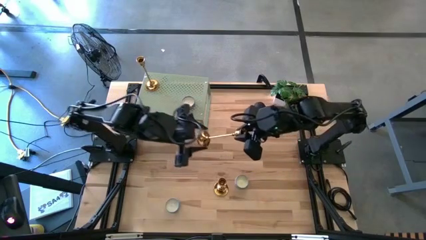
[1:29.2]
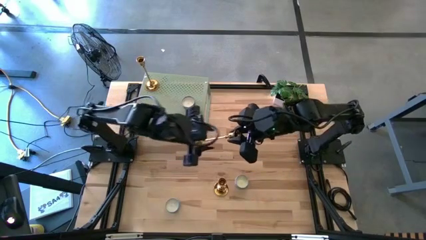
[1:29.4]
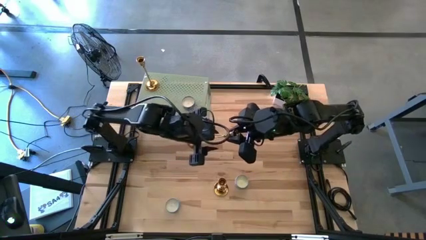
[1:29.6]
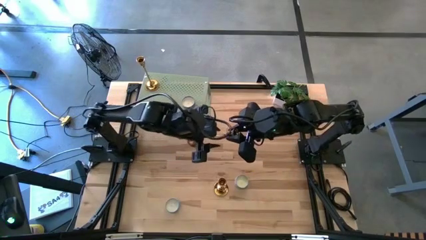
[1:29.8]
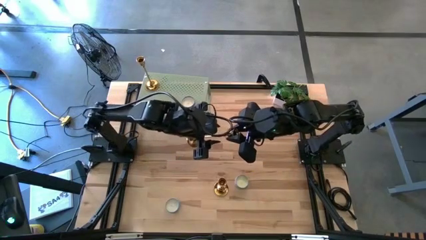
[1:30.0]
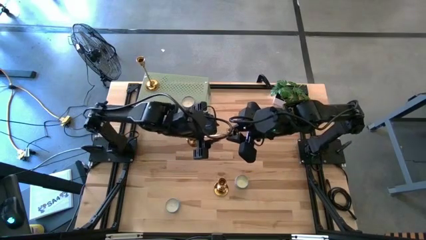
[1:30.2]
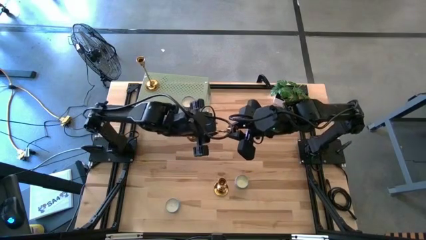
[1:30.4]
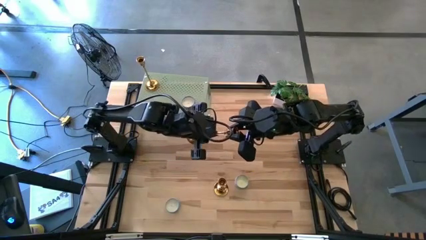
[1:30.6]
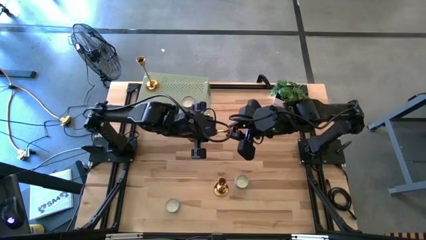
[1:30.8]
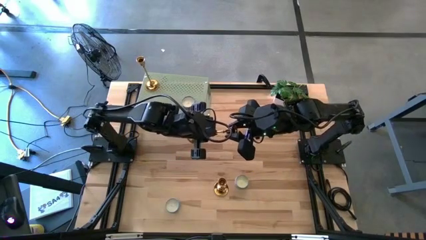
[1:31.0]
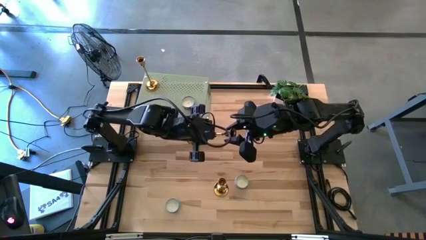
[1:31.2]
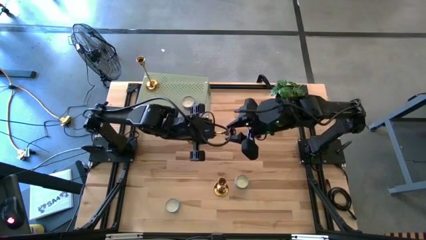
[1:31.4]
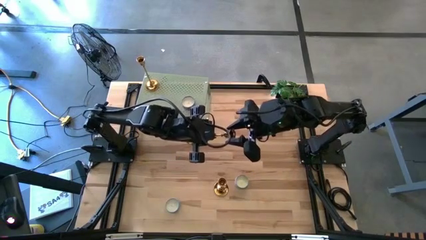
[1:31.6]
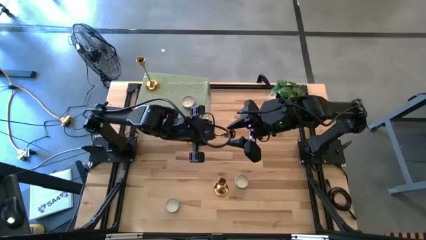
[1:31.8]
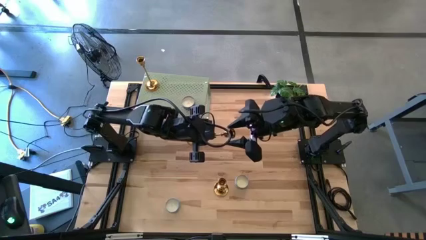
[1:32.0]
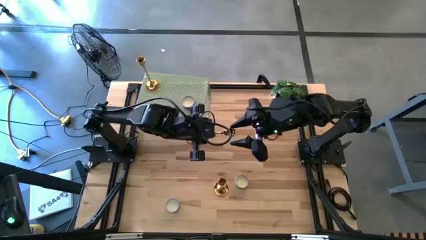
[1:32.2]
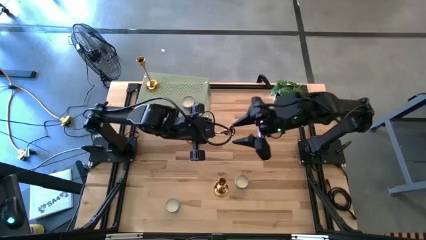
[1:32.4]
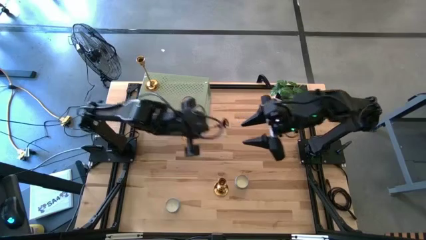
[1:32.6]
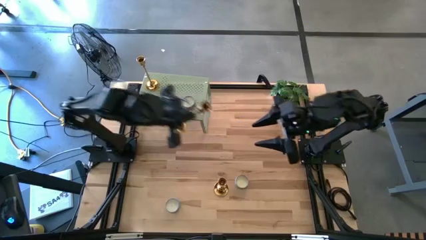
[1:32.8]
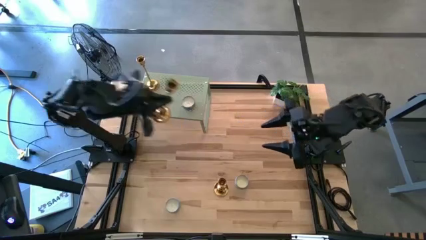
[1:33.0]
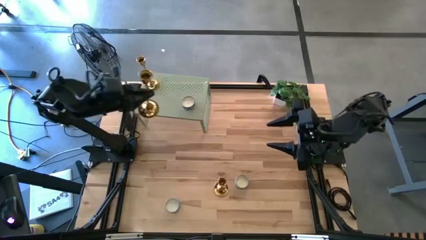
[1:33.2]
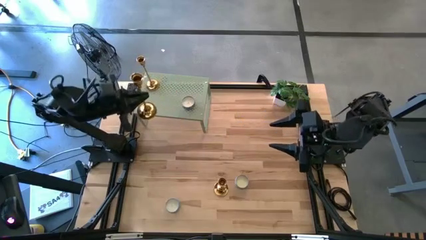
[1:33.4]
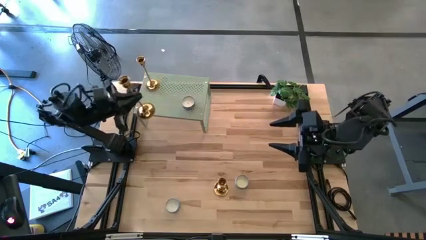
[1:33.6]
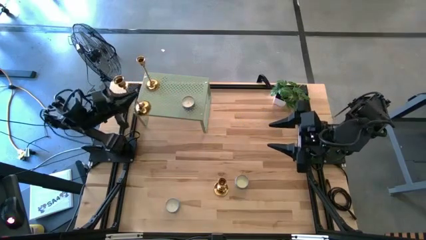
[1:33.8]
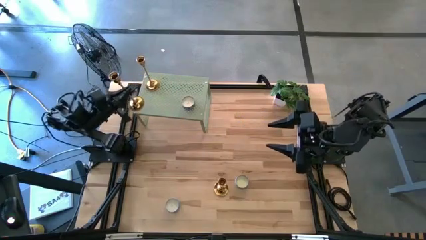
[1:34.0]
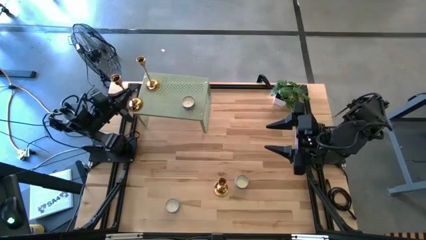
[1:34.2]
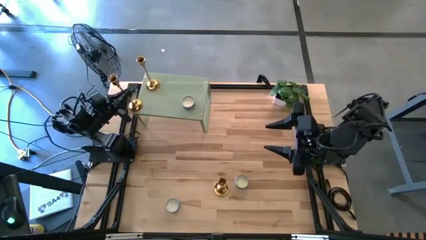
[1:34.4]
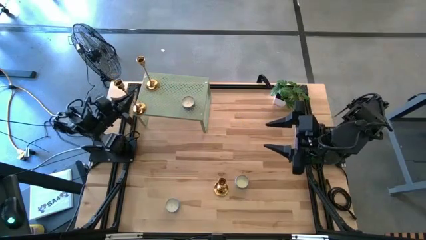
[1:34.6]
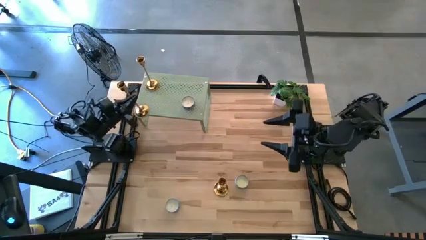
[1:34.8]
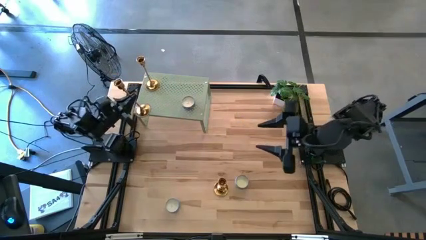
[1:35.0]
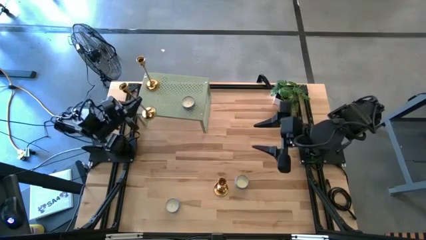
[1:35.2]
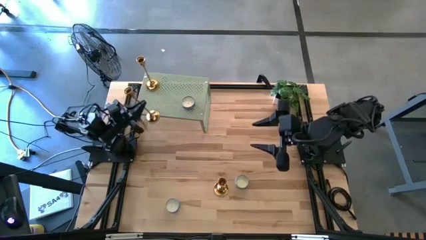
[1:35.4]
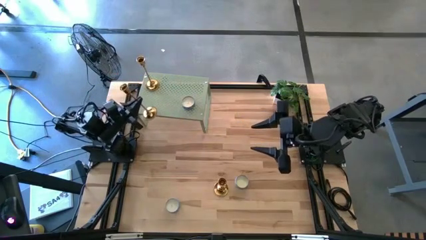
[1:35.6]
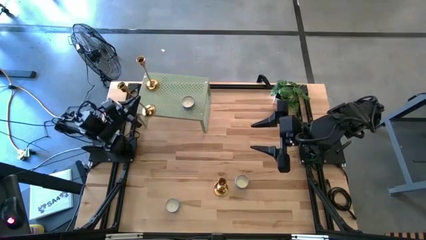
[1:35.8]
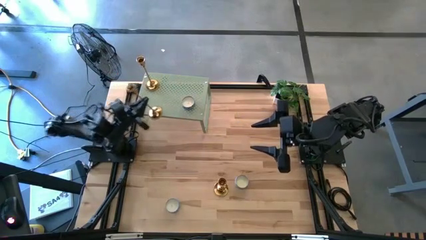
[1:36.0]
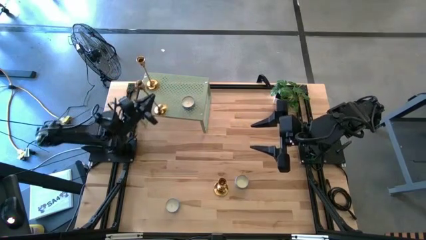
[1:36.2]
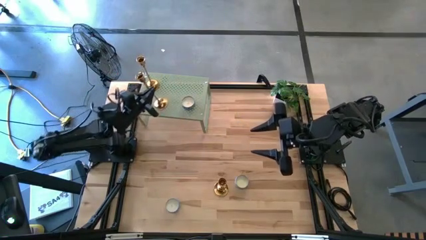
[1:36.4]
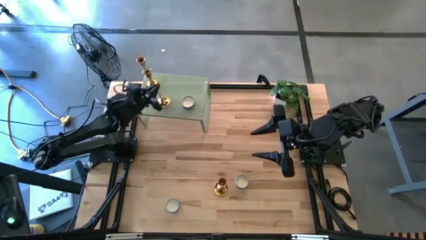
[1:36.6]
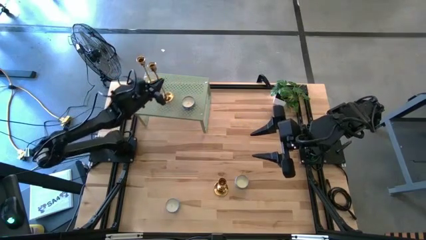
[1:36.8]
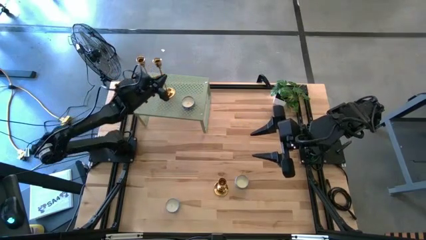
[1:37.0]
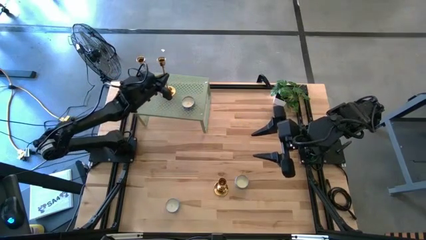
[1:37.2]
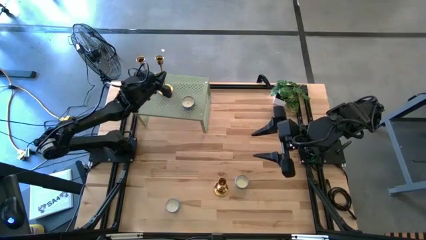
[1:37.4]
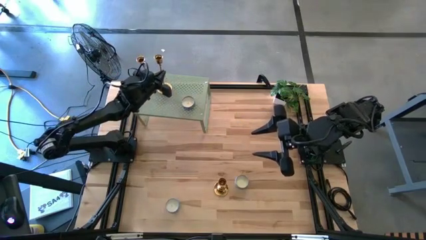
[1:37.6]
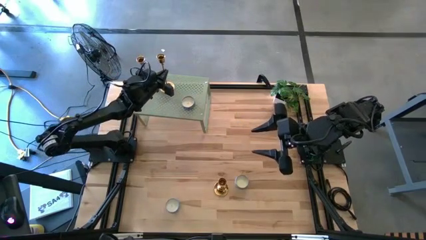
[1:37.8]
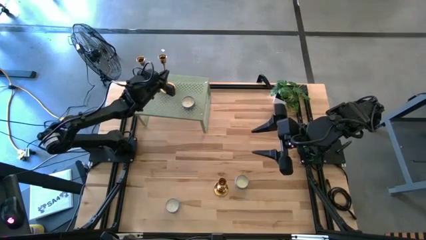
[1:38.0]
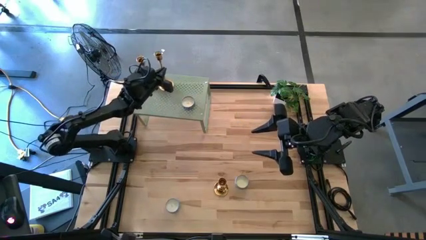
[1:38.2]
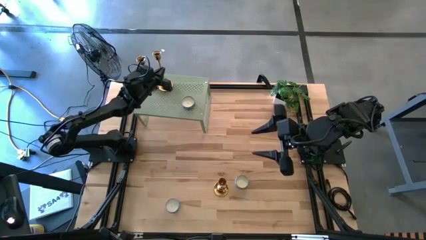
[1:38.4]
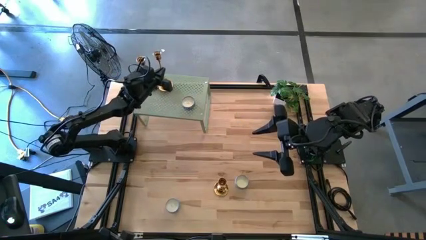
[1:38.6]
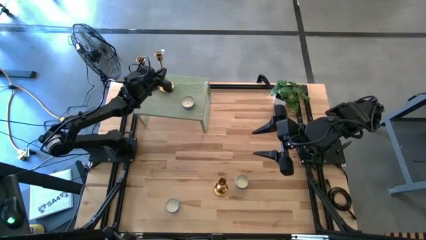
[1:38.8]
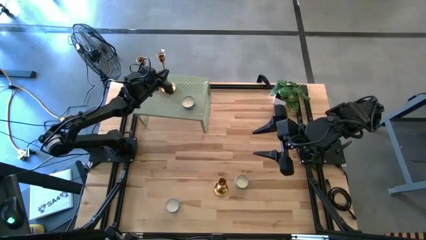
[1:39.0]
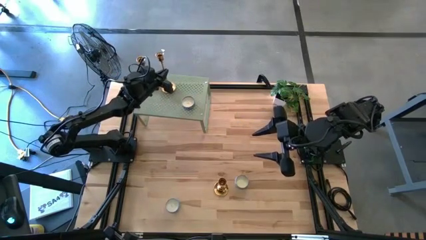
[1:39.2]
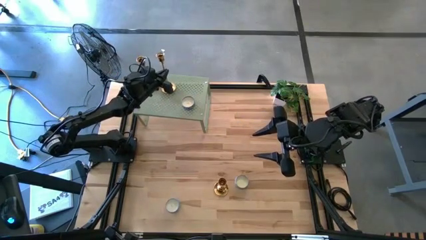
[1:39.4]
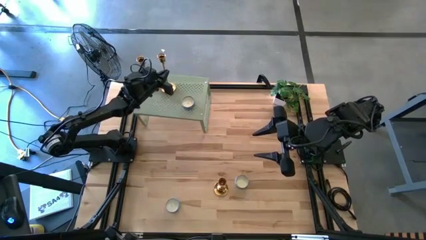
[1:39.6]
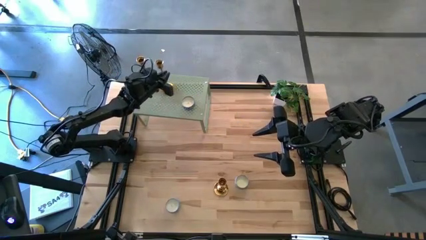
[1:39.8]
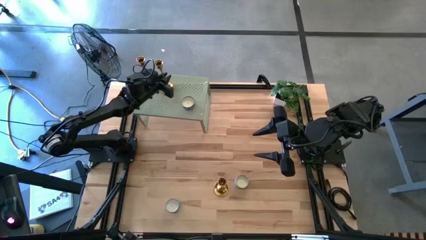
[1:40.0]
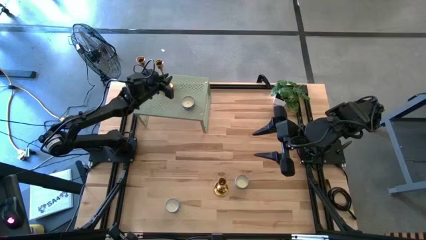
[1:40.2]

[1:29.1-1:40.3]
Task: Pick & Place candle stick holders
Put the right gold candle holder on the shelf

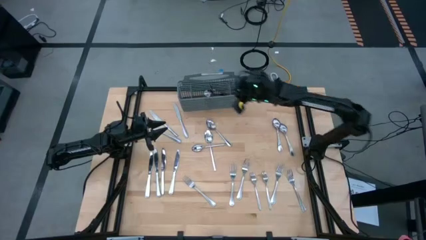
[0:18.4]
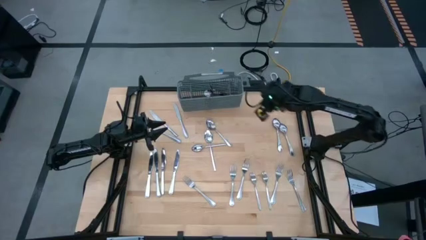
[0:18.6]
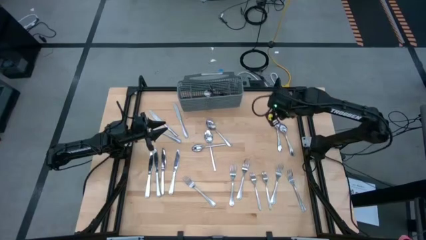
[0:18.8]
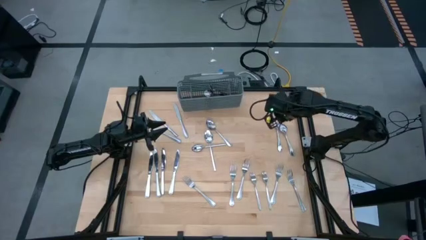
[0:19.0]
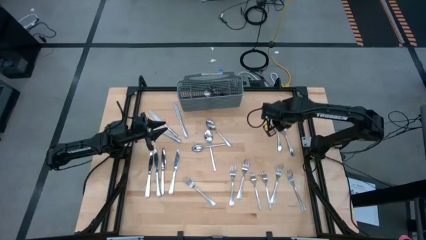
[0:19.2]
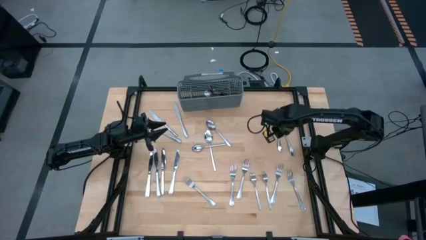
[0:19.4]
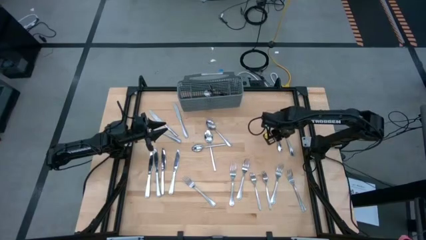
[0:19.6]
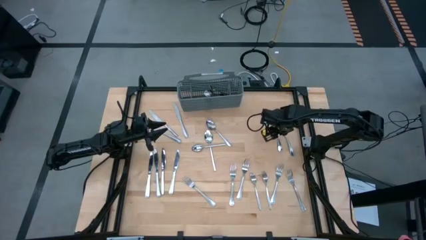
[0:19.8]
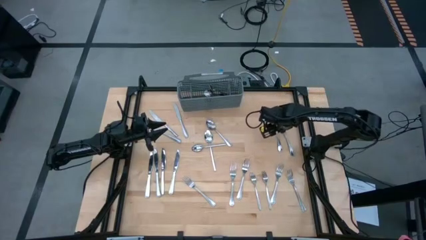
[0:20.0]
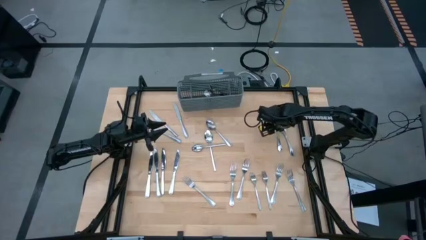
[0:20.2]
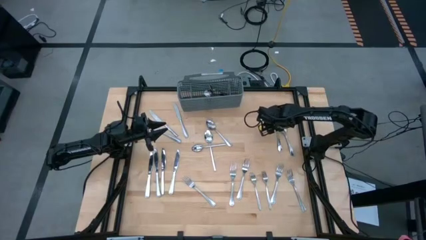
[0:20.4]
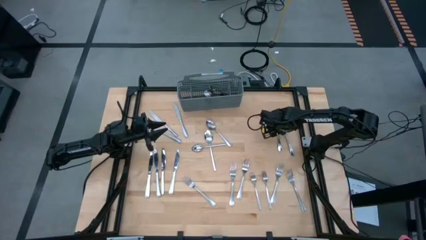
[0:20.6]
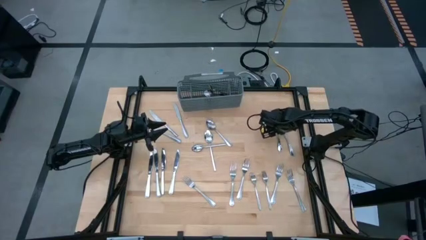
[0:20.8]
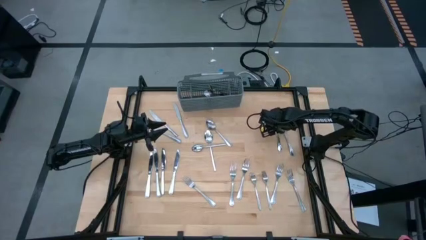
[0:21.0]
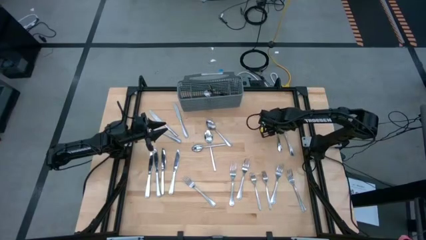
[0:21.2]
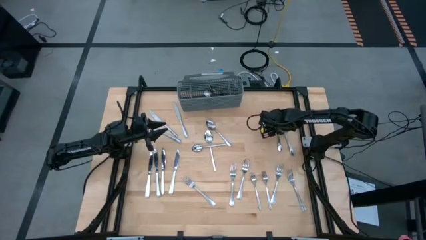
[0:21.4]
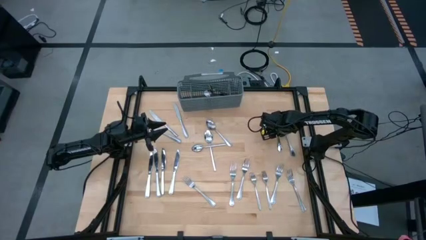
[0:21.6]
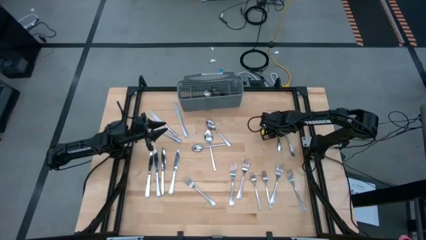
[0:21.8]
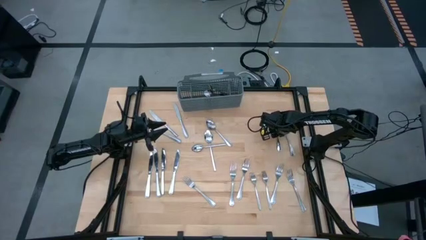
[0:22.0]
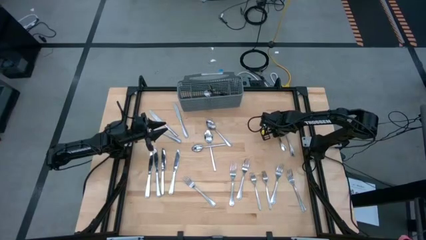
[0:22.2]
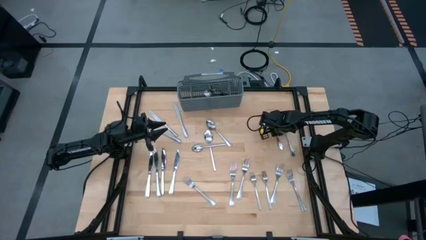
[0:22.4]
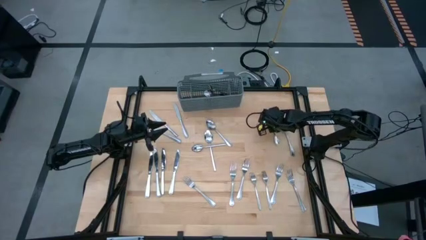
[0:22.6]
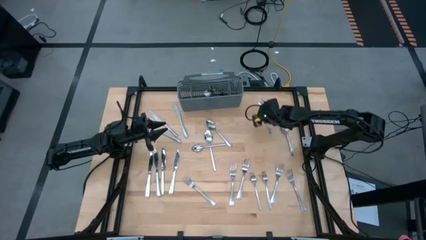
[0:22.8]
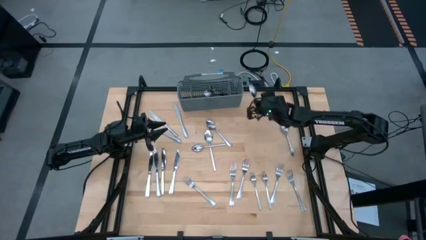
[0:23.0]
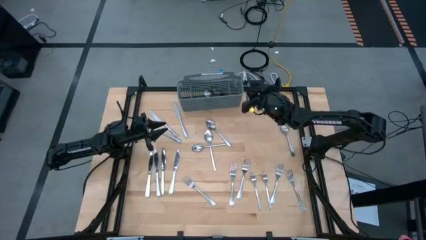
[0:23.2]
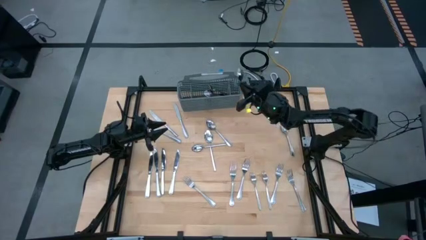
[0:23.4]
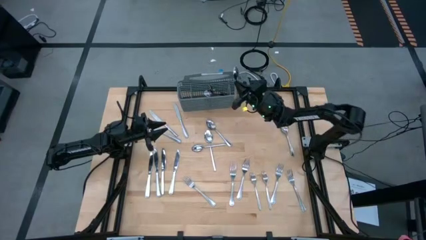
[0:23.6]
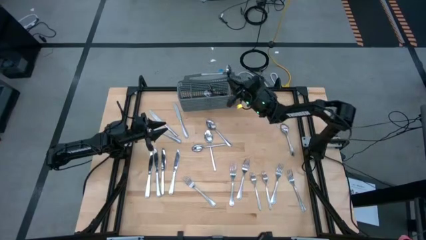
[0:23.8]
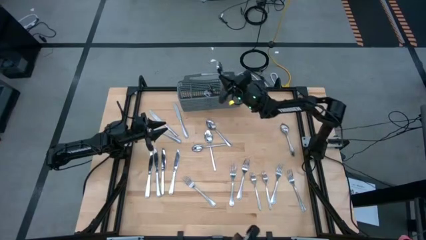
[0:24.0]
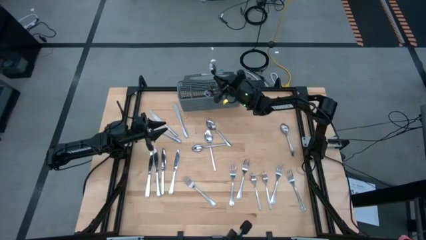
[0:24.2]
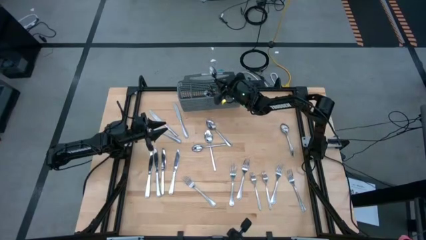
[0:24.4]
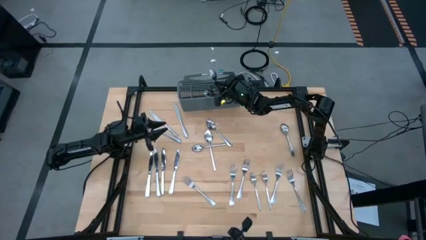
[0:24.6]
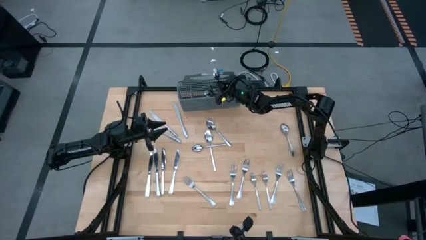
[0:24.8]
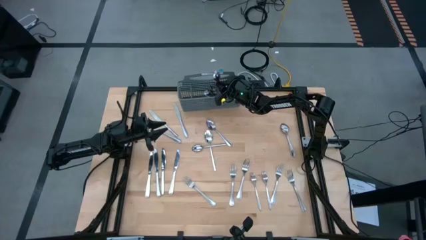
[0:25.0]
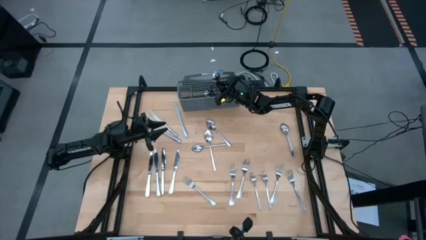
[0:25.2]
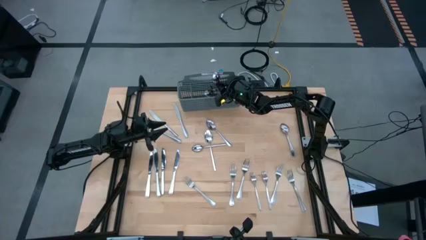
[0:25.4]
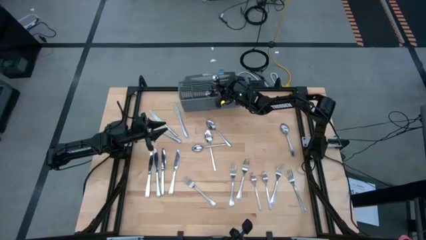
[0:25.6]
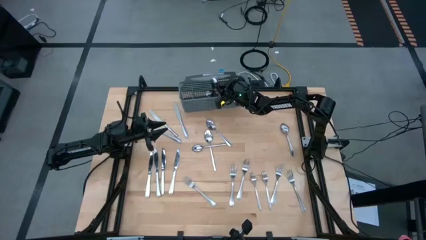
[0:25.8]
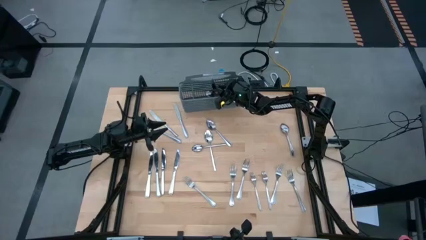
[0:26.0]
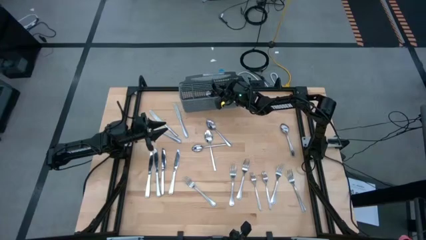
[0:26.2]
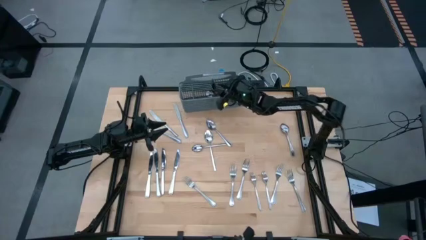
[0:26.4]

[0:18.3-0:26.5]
Task: Sort silverware
Put the silver spoon into the gray utensil holder
